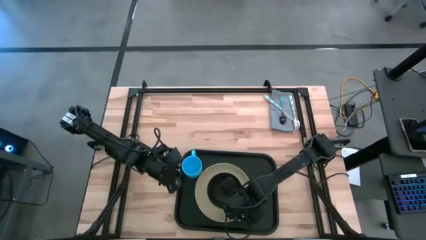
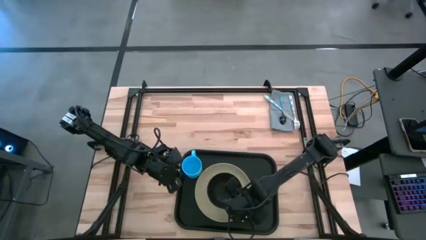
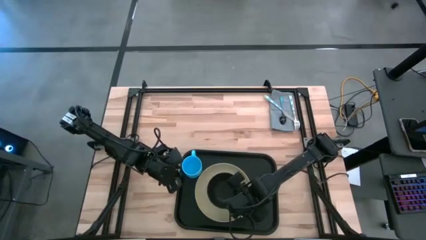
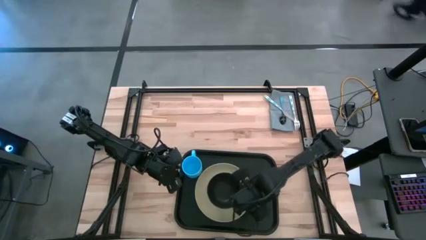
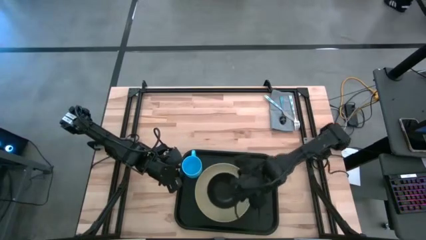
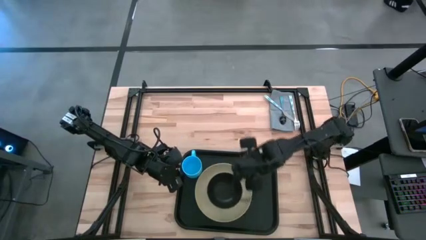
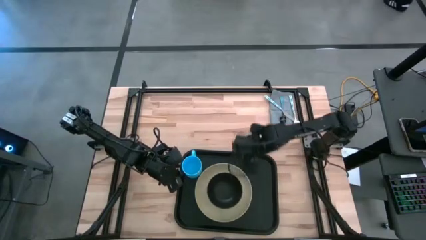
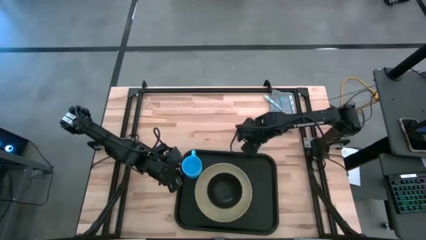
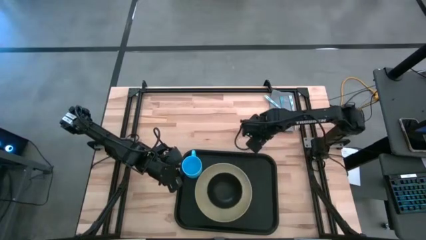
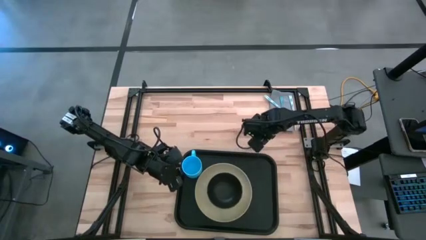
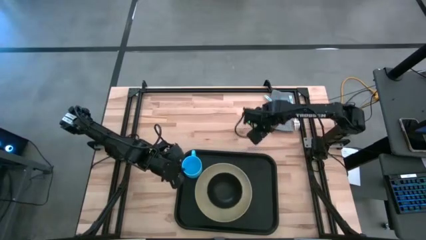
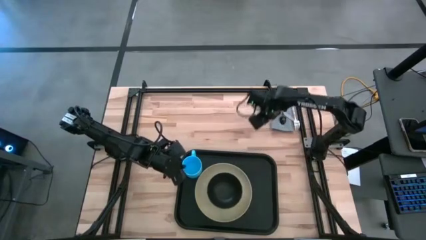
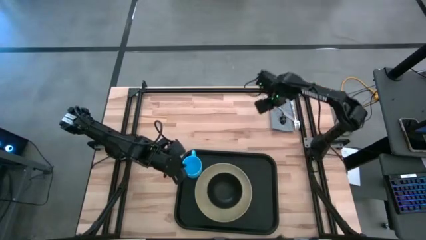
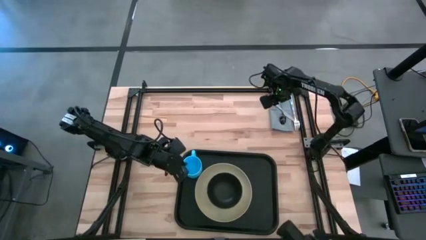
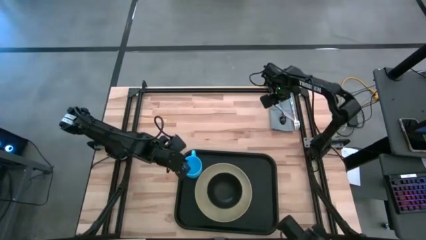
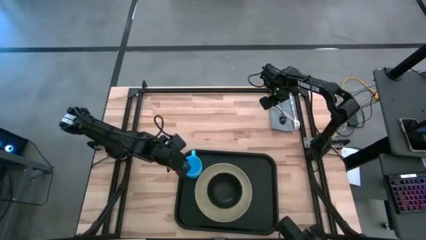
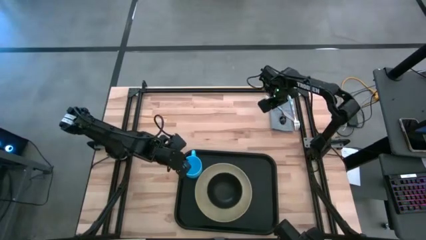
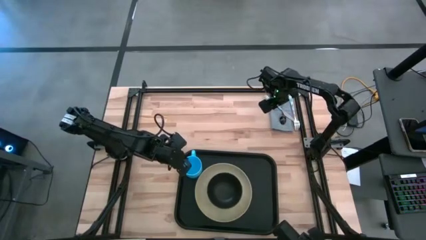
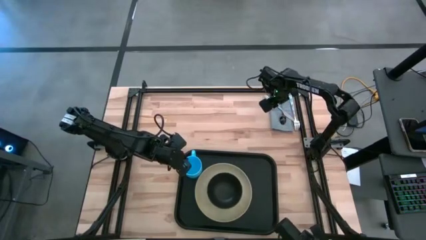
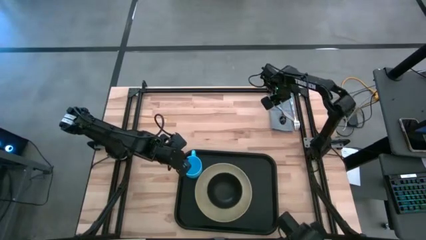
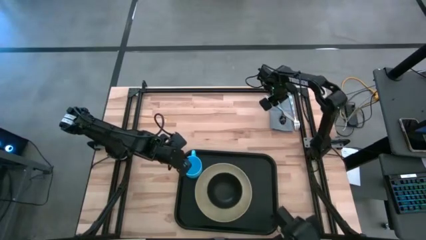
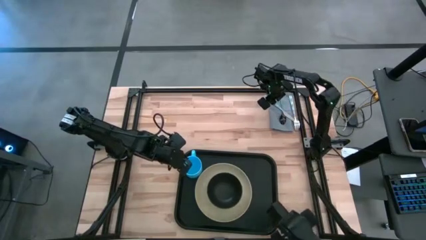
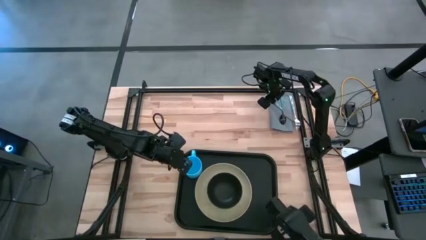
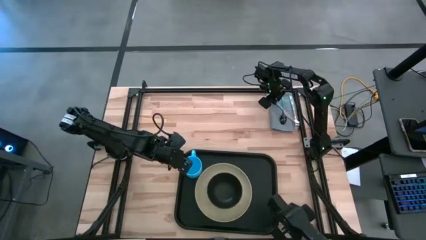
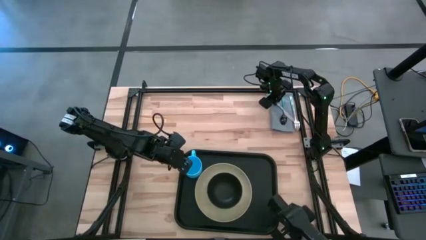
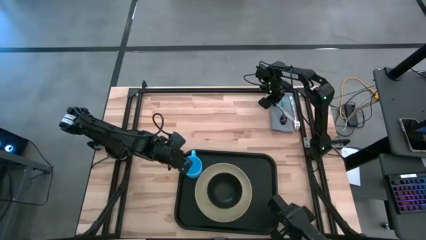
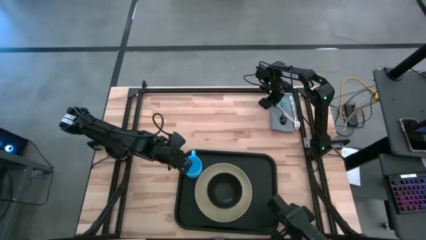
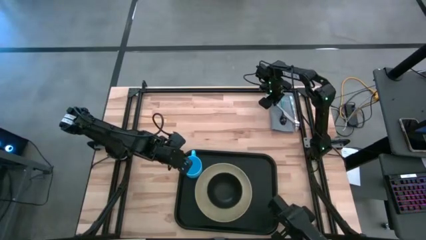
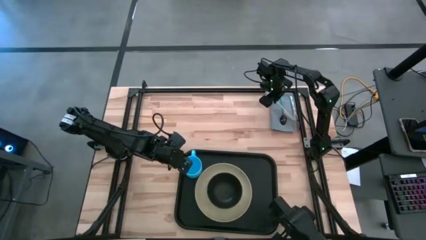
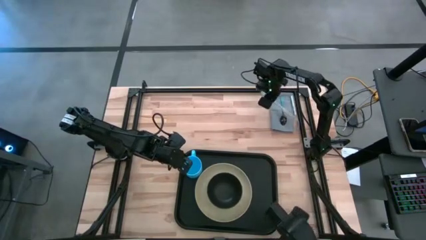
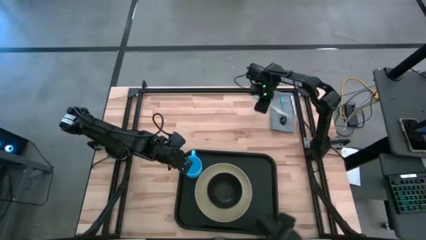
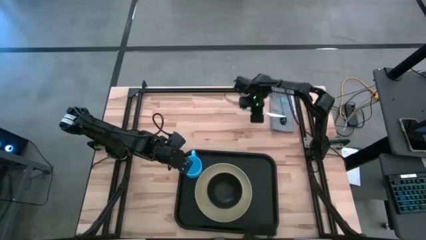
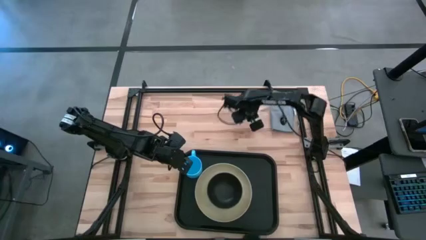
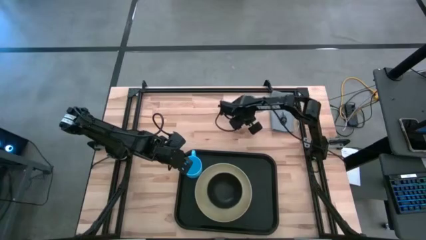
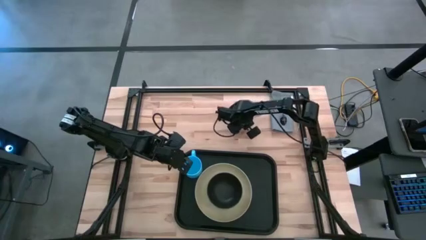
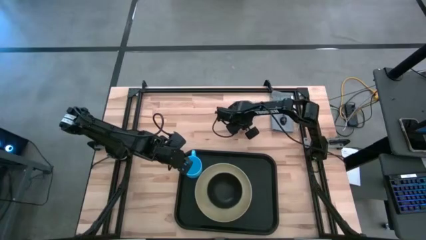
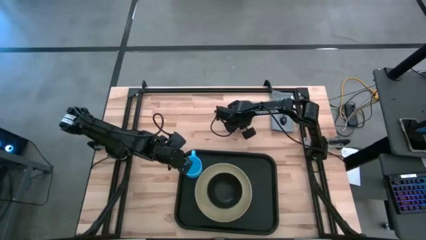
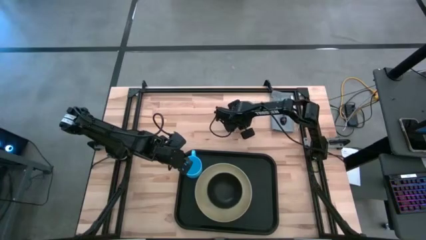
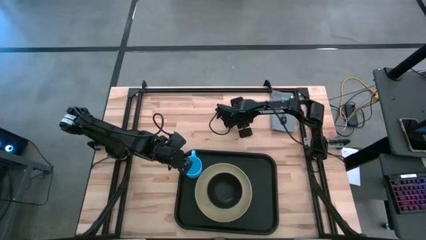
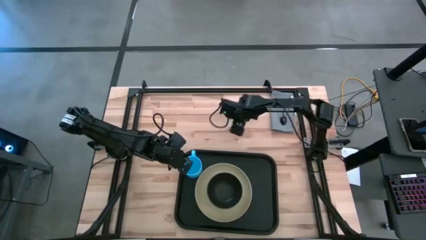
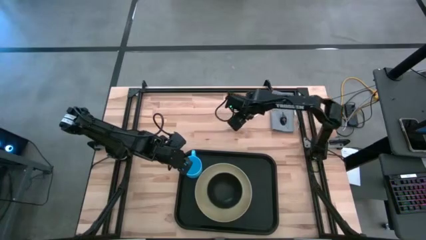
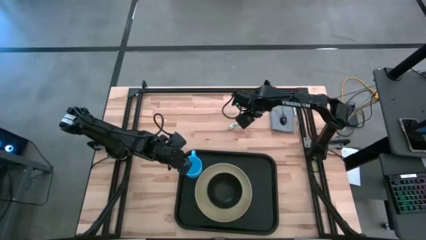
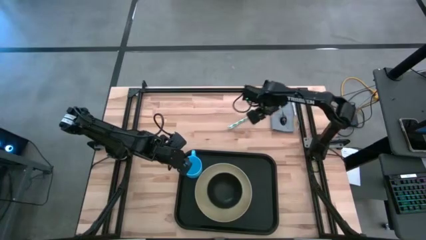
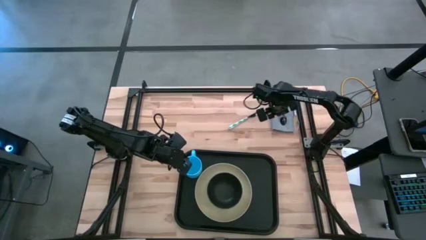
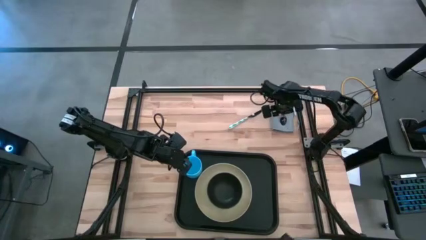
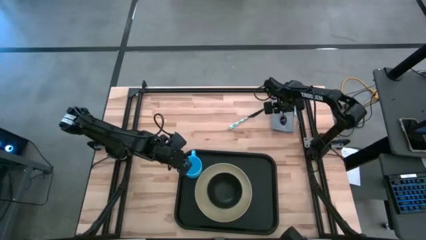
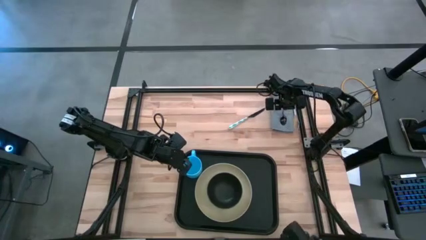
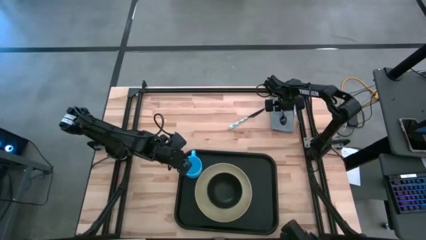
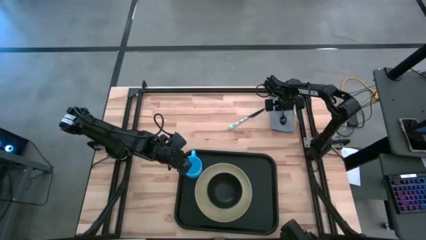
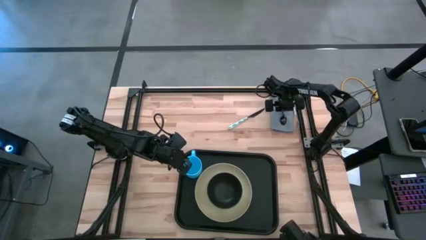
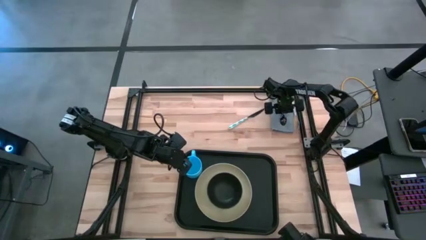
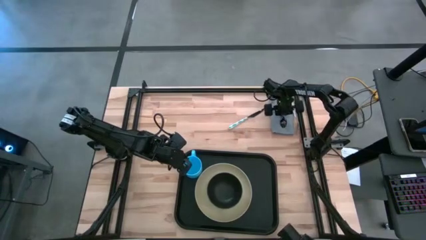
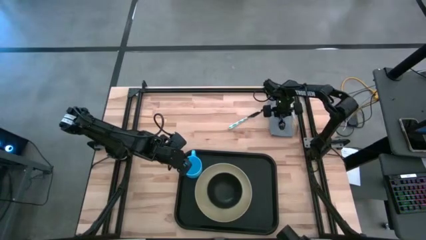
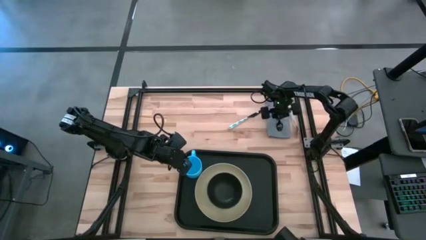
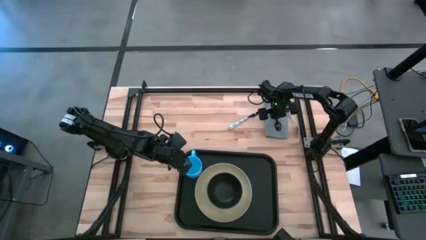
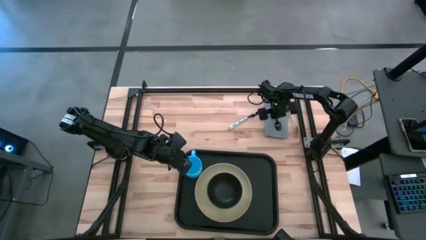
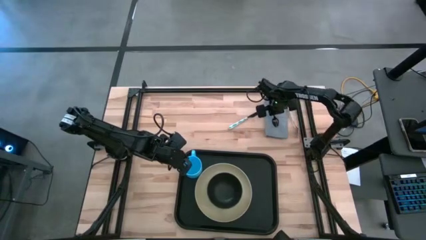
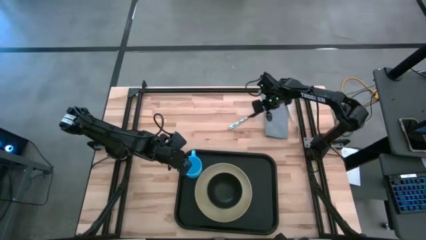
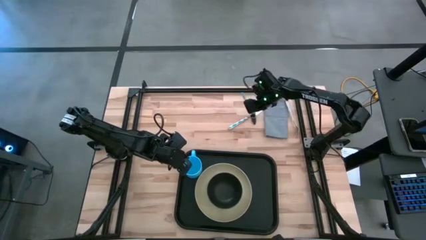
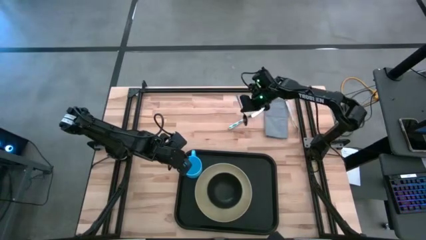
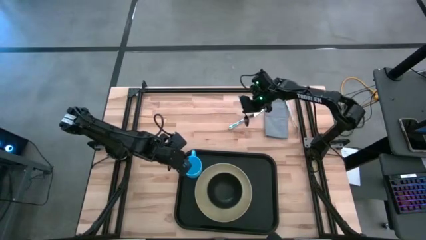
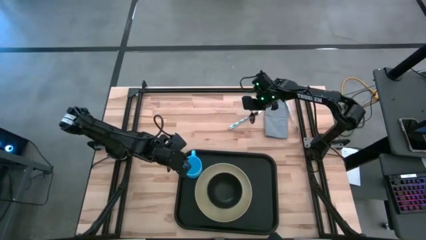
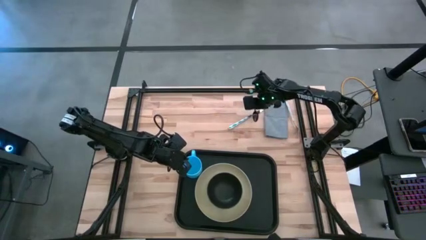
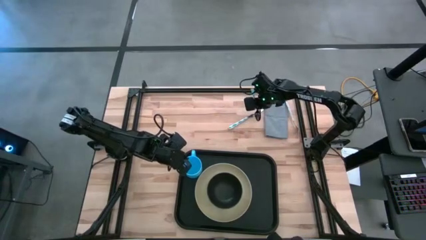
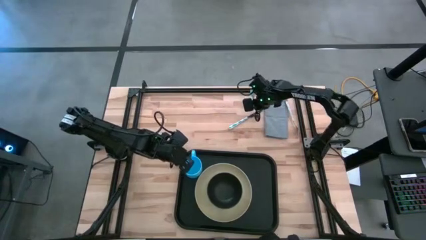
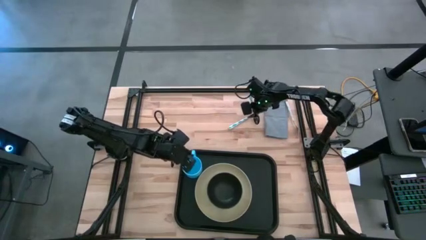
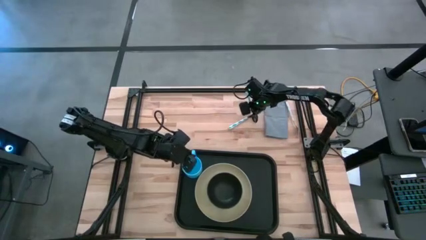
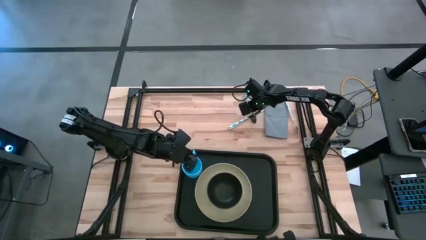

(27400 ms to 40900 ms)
Task: Set up tray
Remove the silverware from the gray napkin on the black serving tray

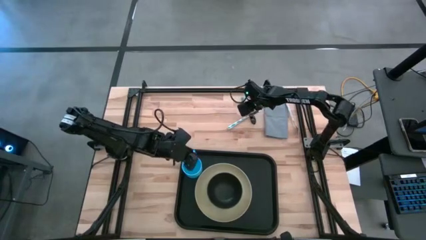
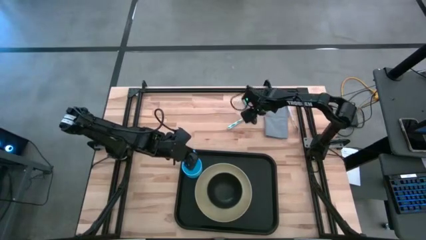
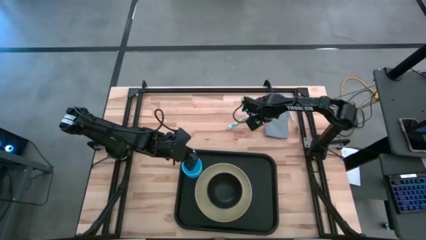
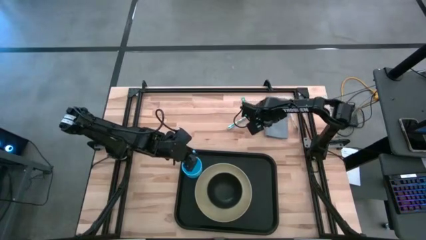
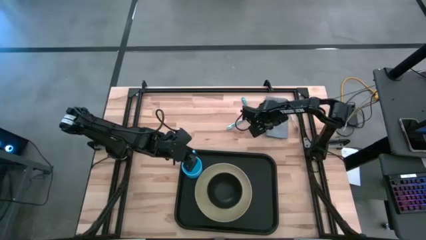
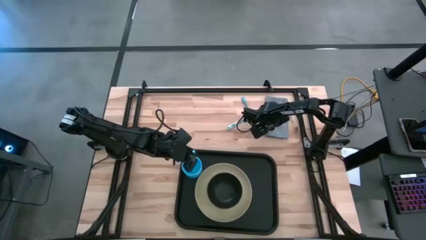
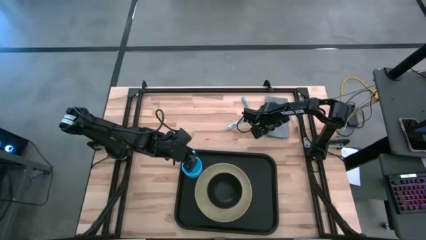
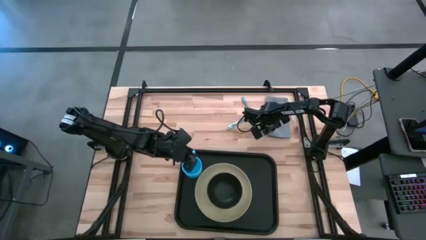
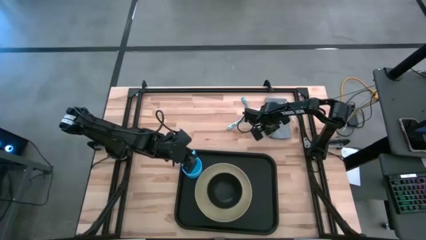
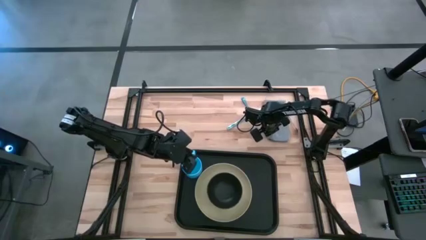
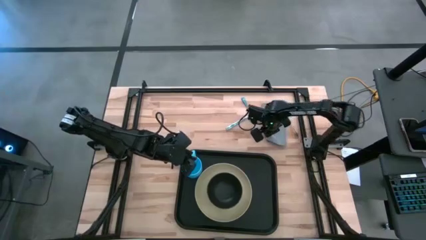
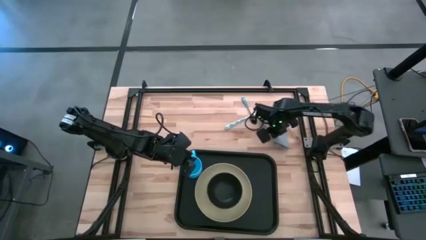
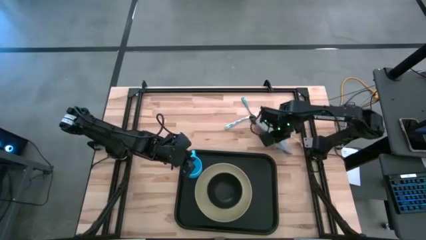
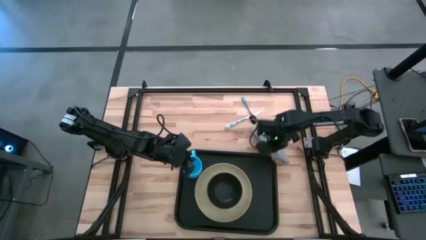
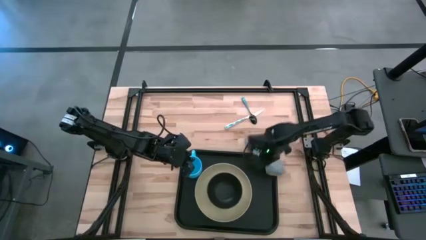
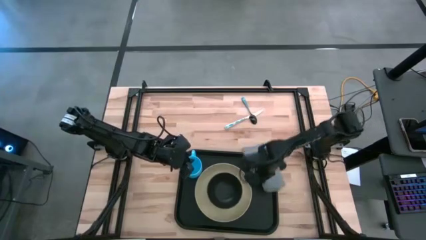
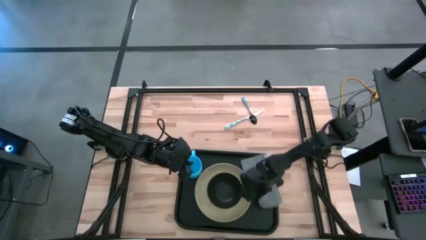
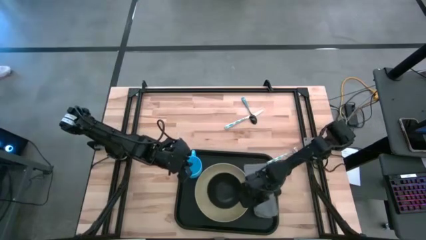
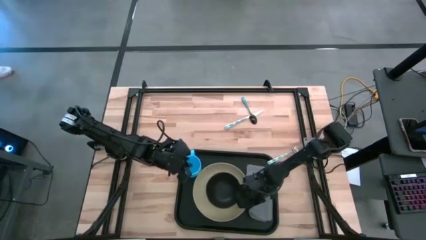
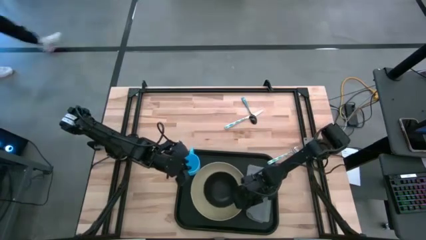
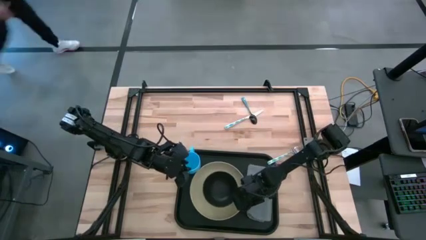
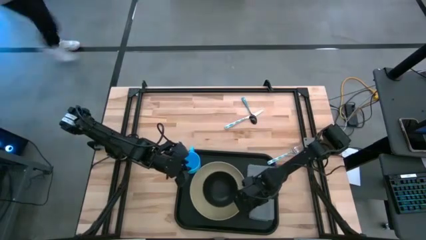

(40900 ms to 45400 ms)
Put the gray napkin to the right side of the brown plate on the black serving tray
